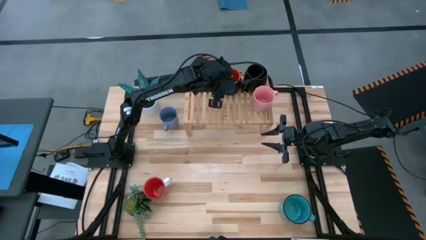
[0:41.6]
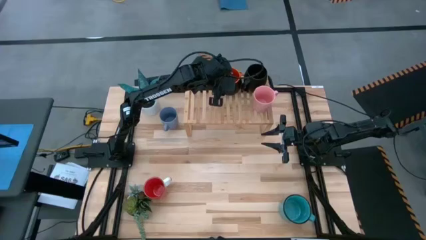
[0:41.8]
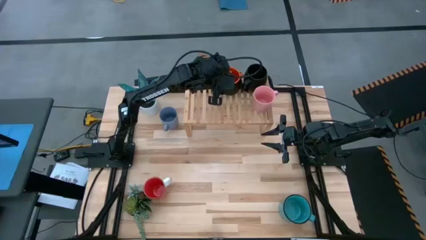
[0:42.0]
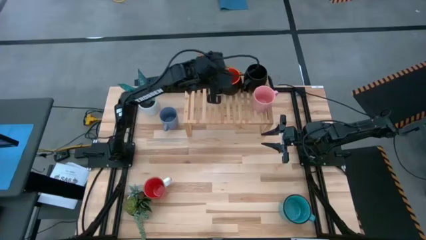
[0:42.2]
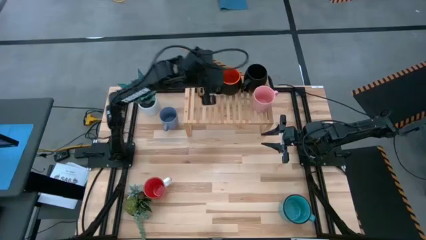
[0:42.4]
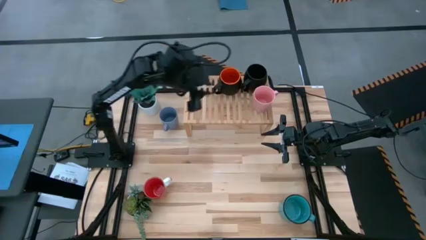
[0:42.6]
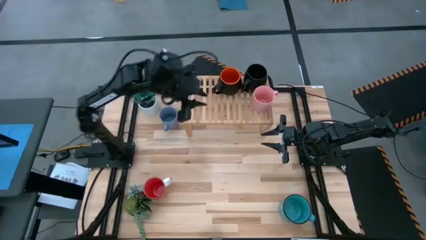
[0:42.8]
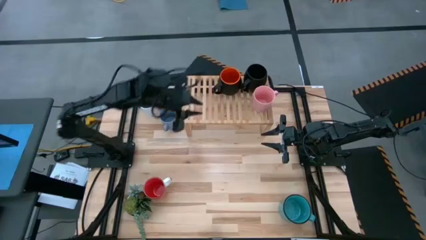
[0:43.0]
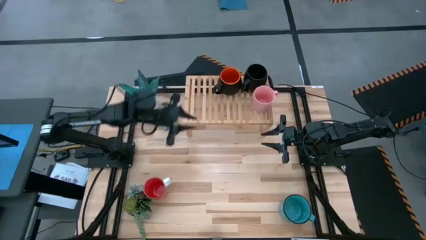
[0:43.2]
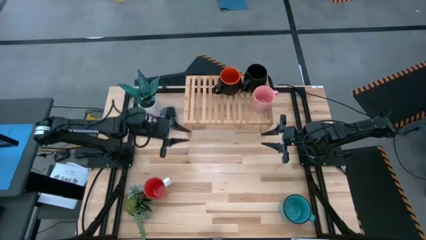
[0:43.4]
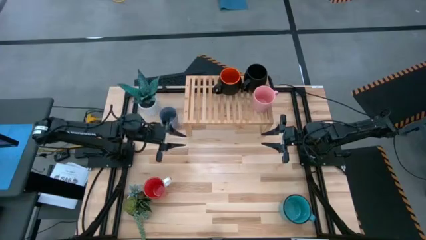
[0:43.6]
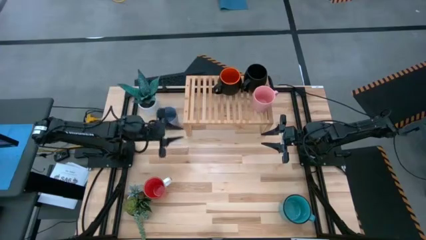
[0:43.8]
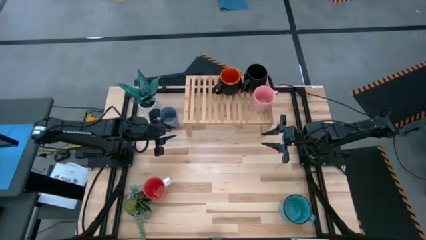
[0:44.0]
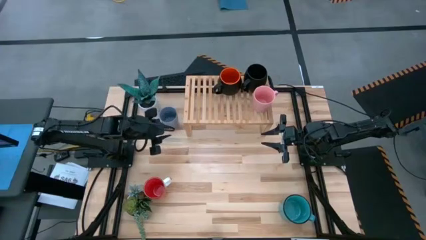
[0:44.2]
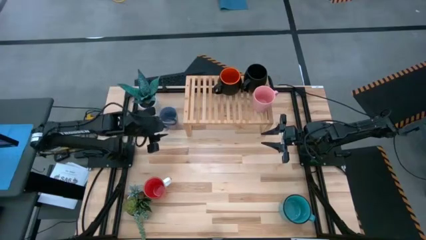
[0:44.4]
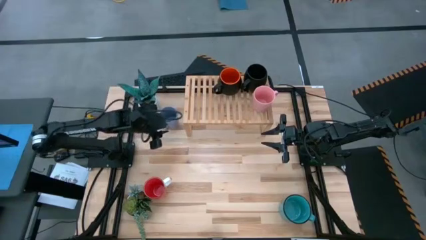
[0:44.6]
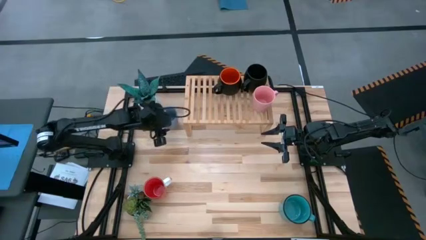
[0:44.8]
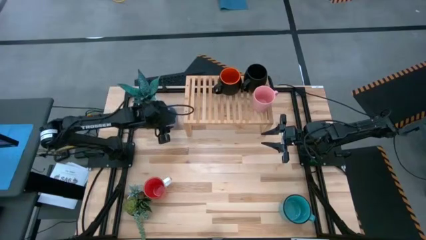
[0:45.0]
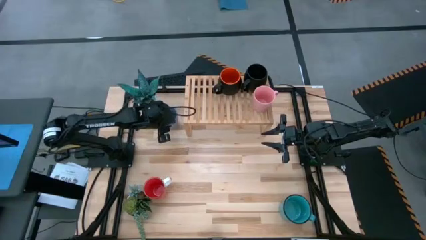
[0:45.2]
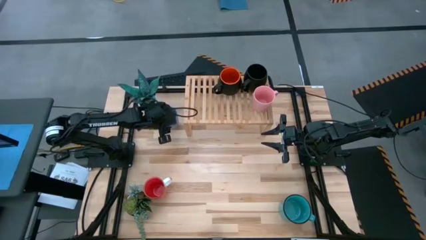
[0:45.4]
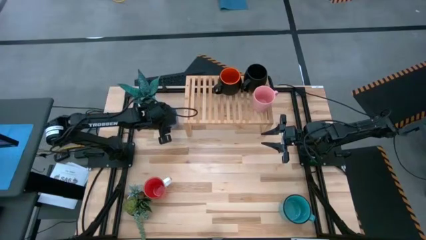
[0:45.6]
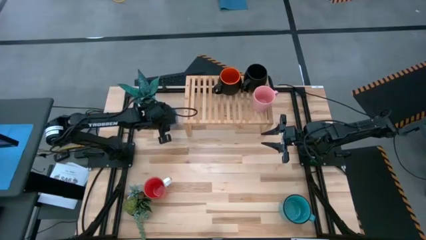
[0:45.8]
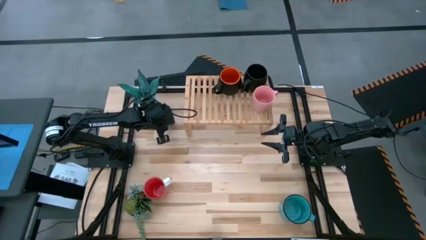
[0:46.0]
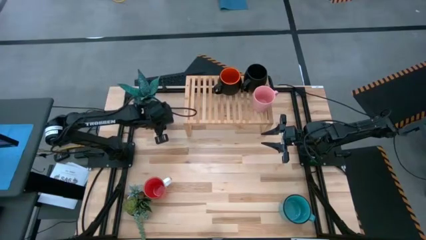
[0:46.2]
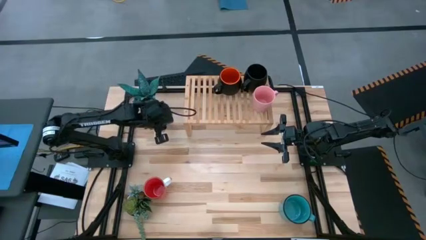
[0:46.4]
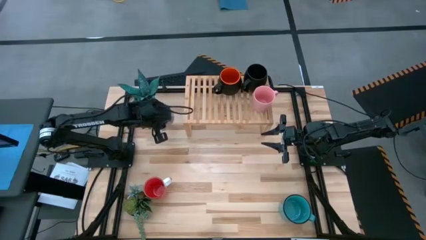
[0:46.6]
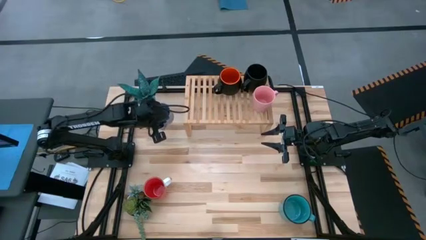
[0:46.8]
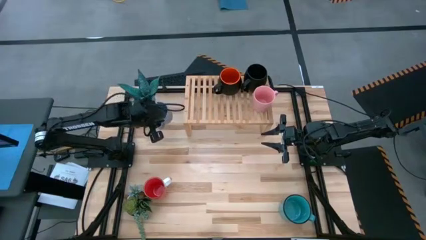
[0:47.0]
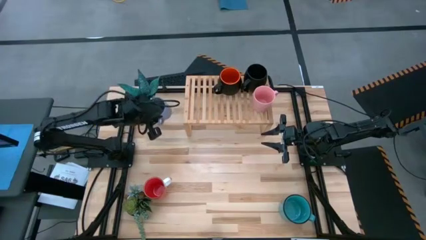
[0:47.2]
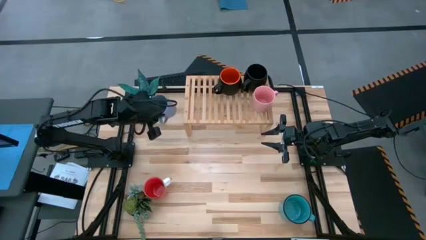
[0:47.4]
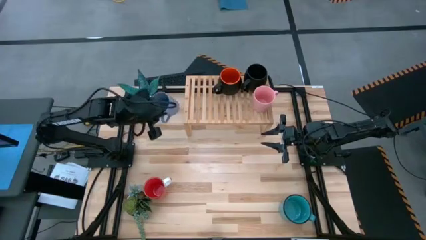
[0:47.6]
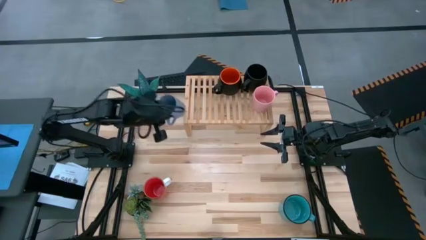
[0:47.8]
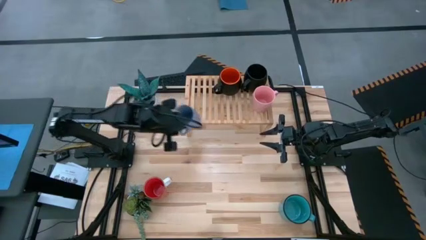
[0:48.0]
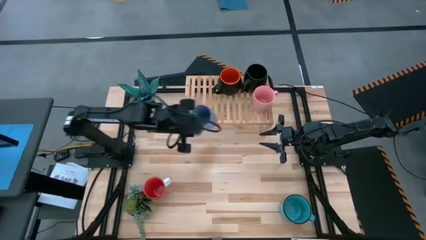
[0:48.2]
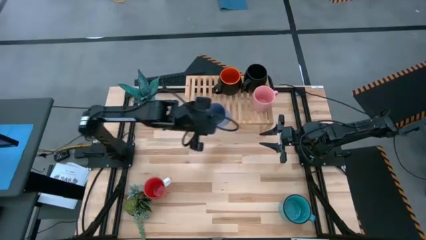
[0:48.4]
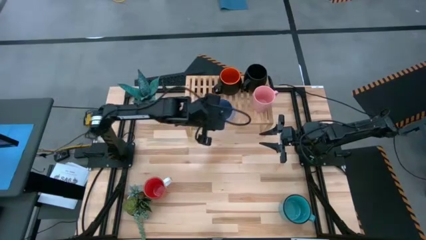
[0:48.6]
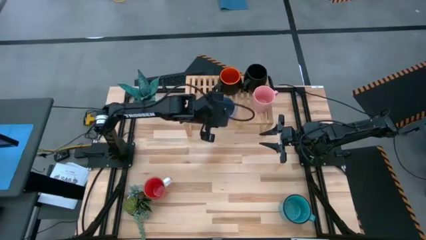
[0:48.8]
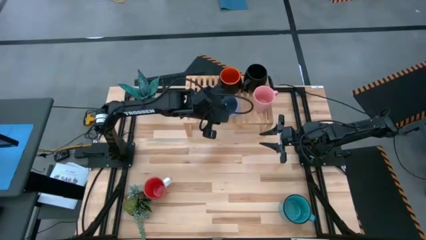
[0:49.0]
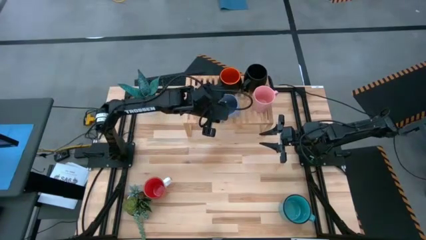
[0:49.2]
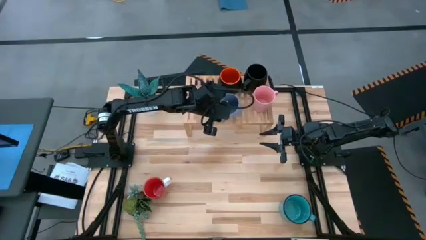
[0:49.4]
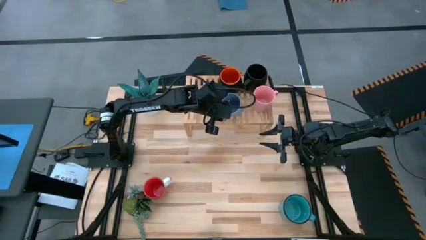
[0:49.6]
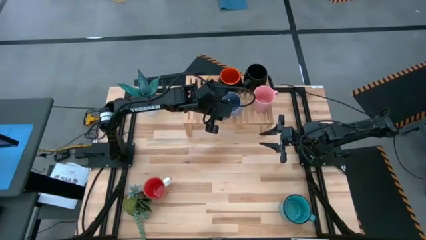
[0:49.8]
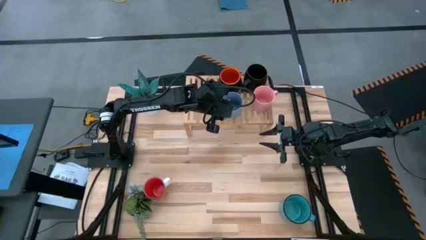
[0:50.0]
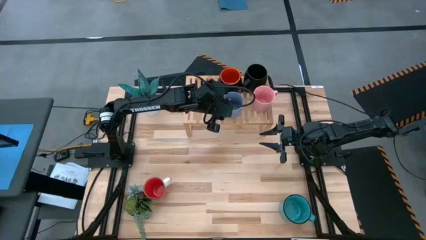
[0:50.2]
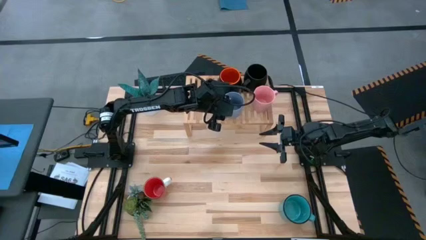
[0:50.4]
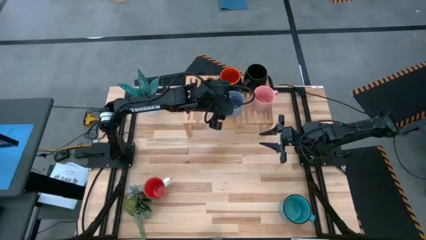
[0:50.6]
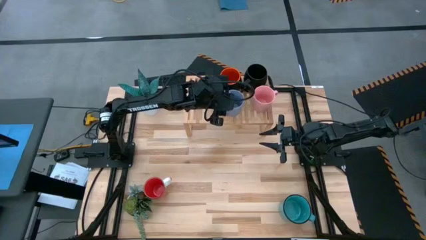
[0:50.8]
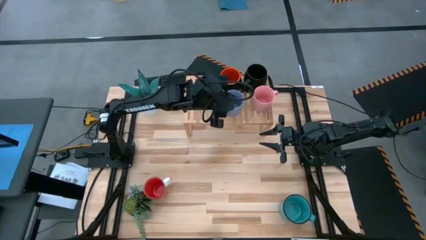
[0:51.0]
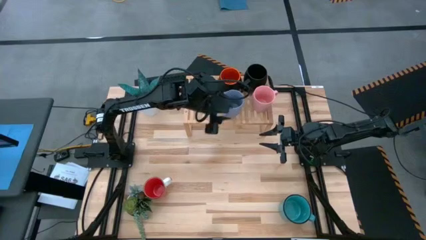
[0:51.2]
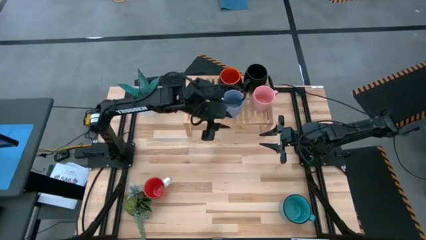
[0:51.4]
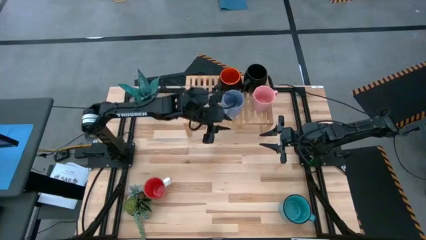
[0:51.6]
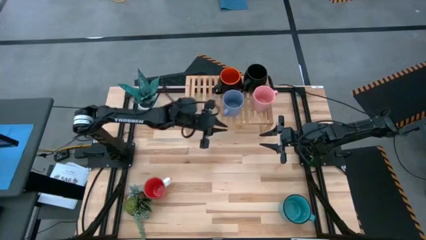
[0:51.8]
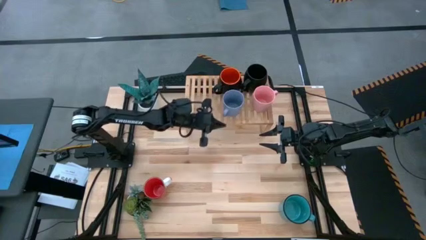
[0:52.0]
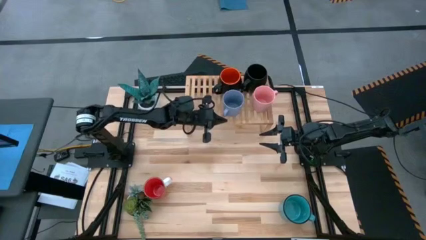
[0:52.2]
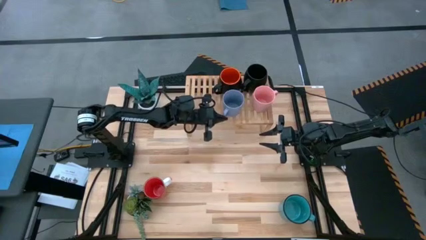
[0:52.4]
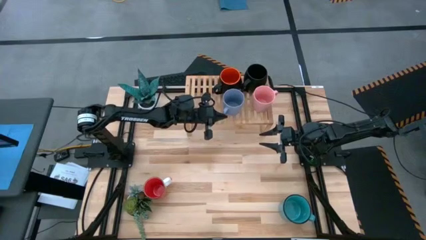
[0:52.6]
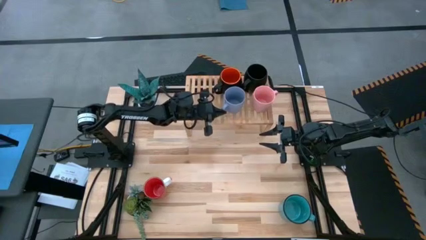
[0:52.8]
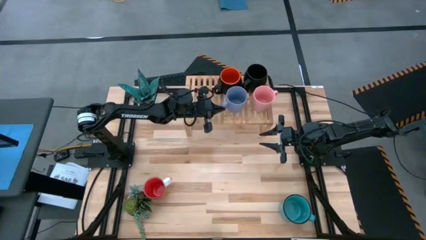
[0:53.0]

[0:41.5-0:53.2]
Task: Place coffee mugs
Put the violet mug on the shelf
